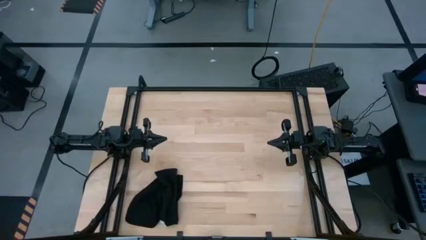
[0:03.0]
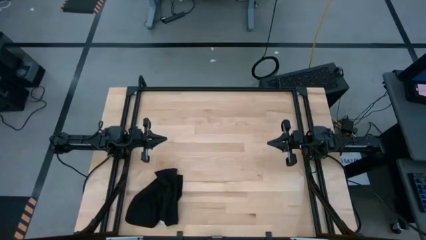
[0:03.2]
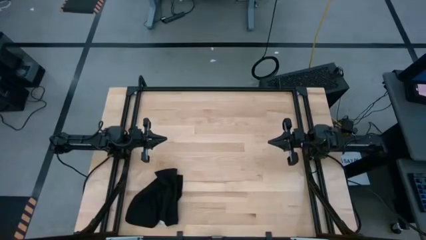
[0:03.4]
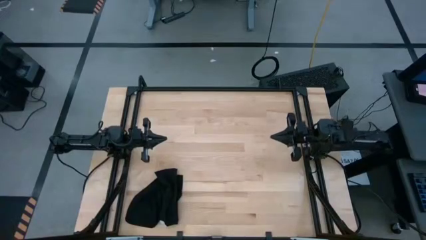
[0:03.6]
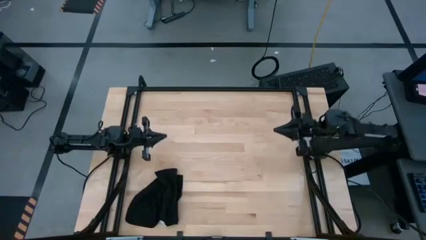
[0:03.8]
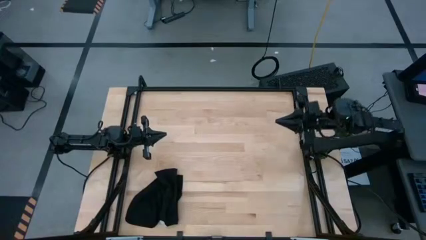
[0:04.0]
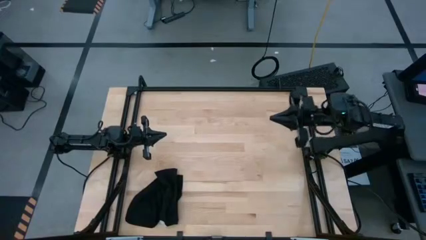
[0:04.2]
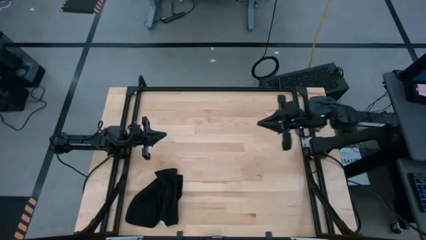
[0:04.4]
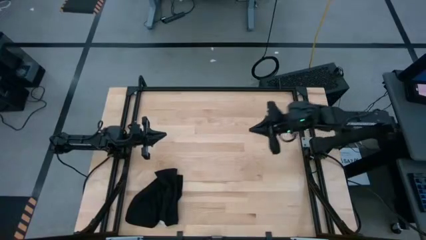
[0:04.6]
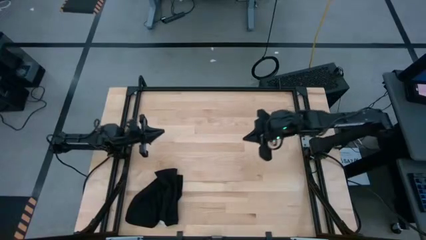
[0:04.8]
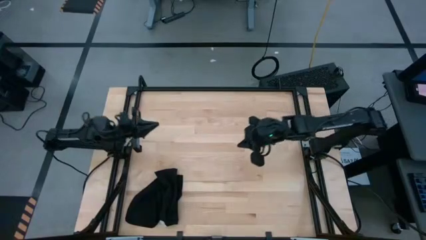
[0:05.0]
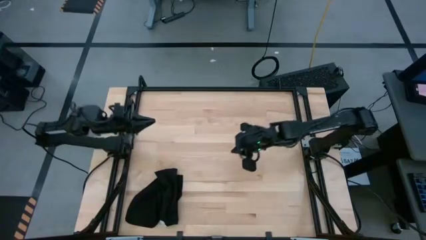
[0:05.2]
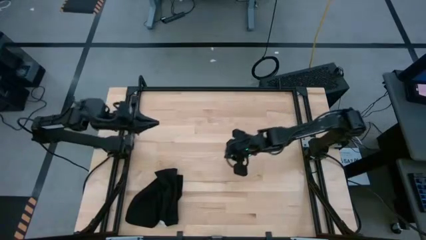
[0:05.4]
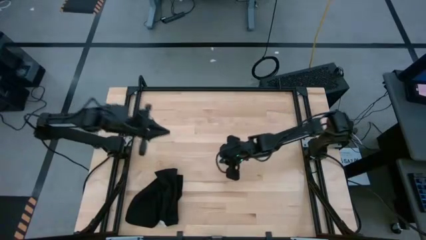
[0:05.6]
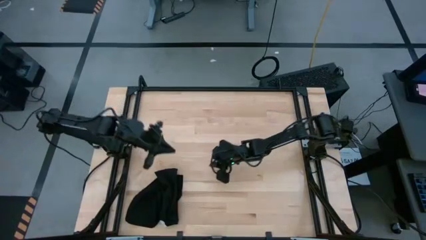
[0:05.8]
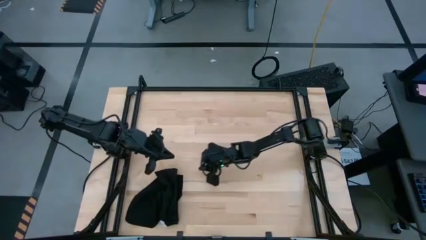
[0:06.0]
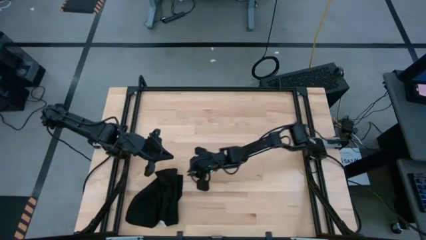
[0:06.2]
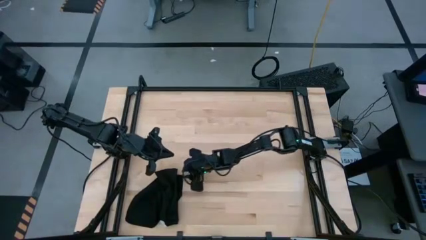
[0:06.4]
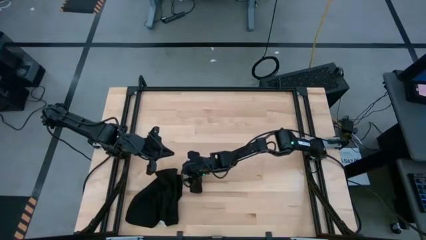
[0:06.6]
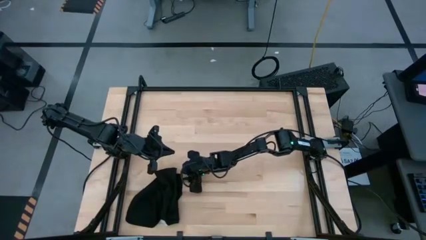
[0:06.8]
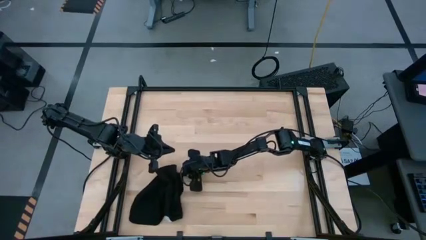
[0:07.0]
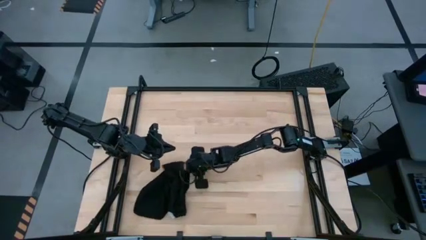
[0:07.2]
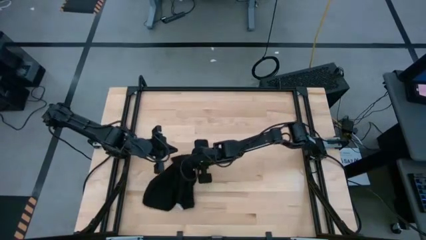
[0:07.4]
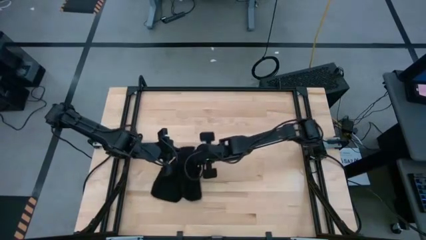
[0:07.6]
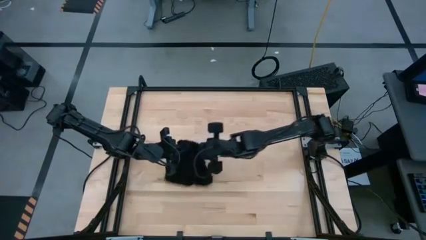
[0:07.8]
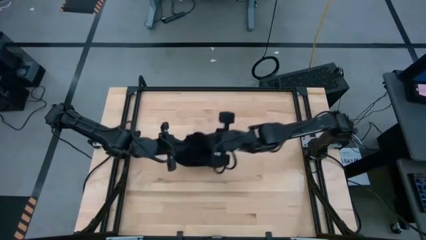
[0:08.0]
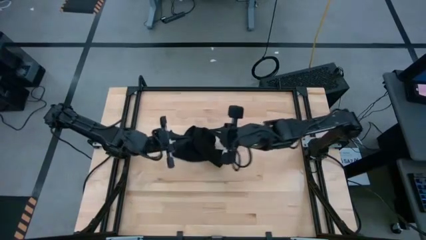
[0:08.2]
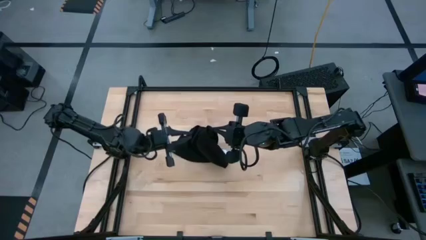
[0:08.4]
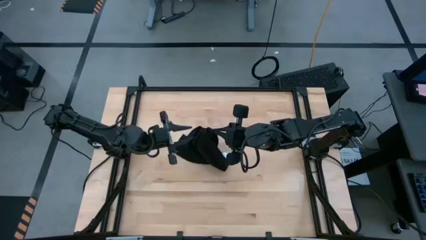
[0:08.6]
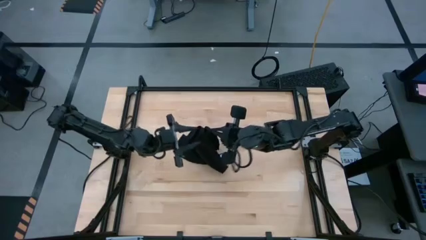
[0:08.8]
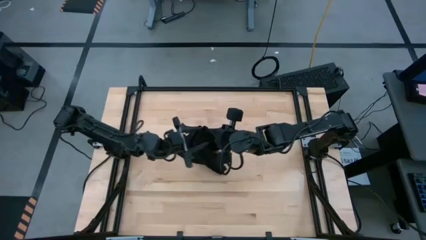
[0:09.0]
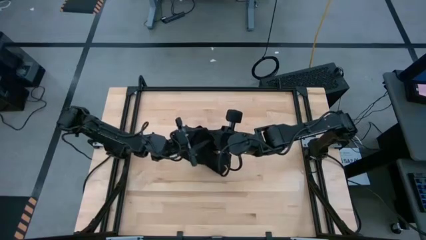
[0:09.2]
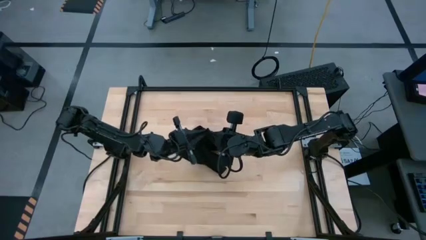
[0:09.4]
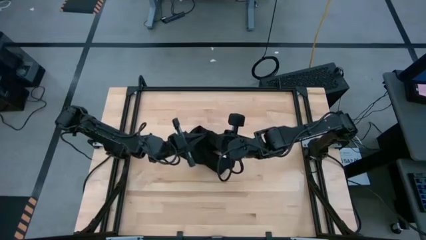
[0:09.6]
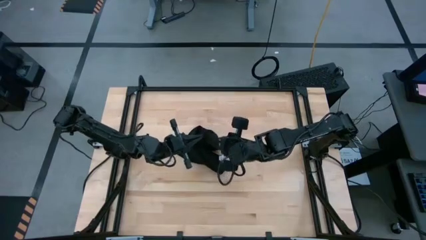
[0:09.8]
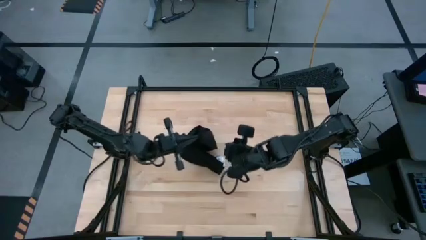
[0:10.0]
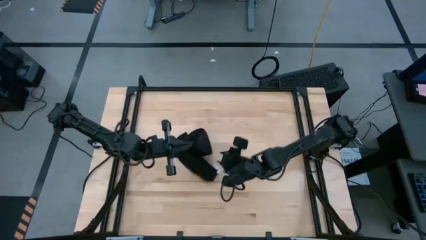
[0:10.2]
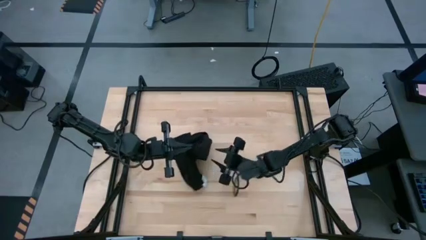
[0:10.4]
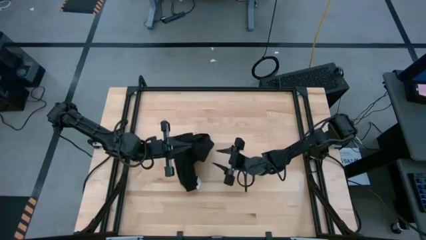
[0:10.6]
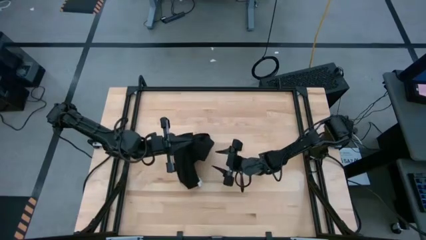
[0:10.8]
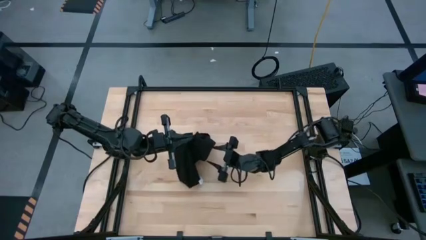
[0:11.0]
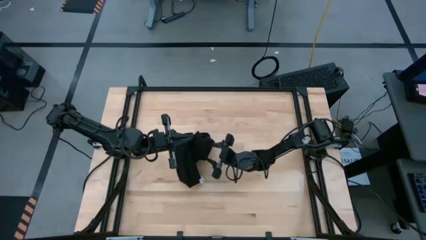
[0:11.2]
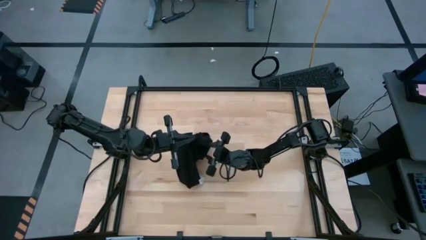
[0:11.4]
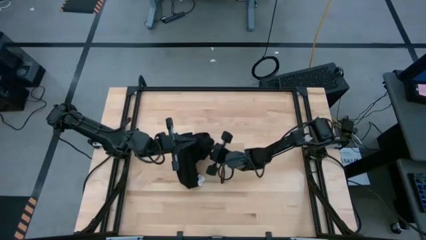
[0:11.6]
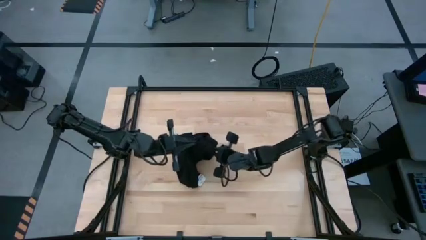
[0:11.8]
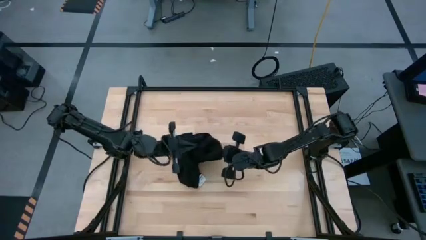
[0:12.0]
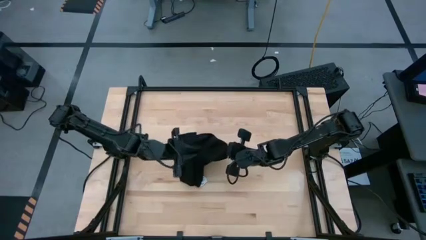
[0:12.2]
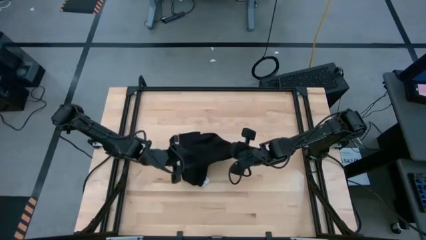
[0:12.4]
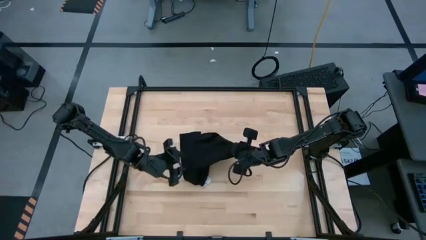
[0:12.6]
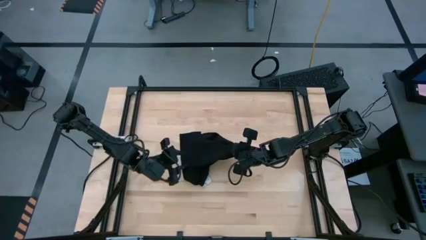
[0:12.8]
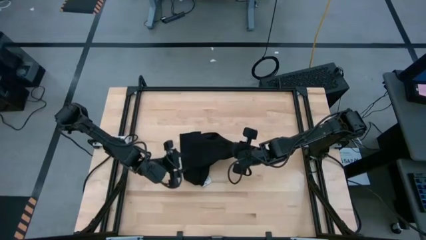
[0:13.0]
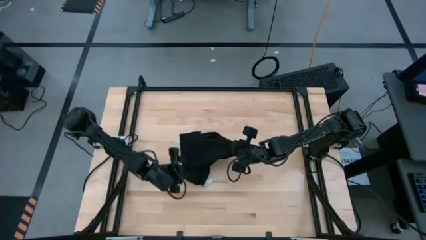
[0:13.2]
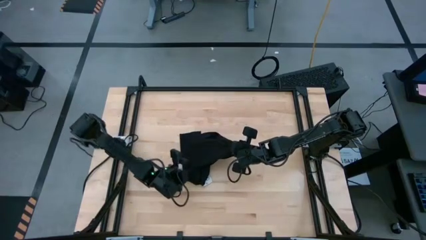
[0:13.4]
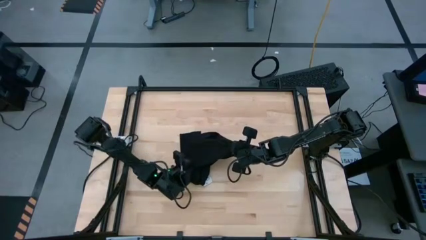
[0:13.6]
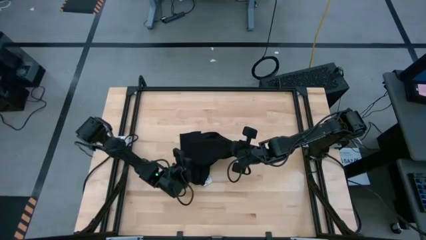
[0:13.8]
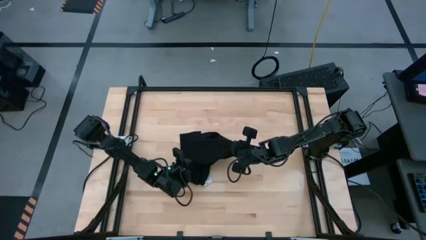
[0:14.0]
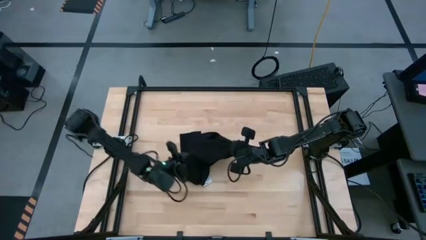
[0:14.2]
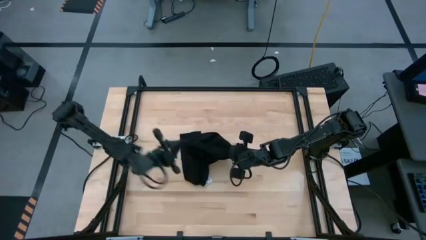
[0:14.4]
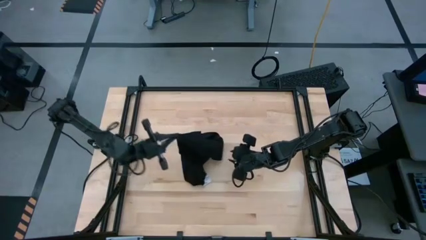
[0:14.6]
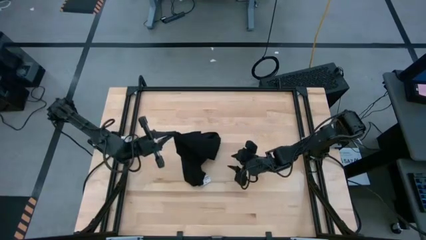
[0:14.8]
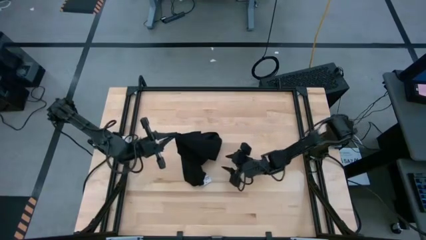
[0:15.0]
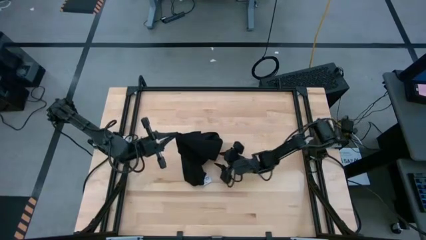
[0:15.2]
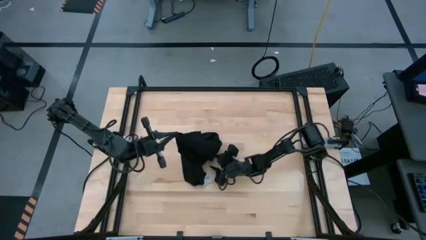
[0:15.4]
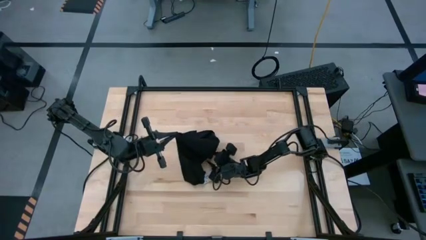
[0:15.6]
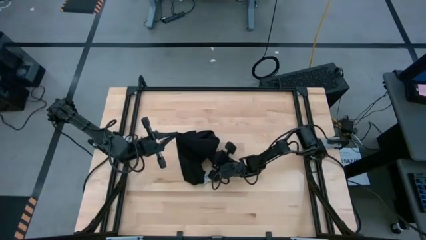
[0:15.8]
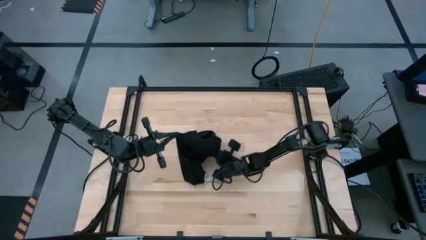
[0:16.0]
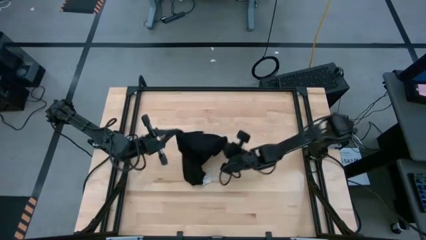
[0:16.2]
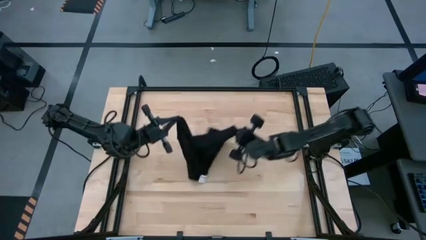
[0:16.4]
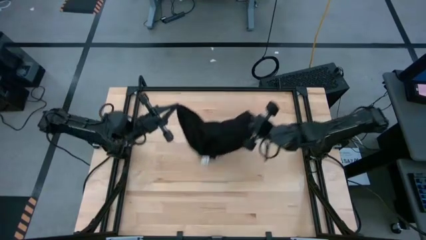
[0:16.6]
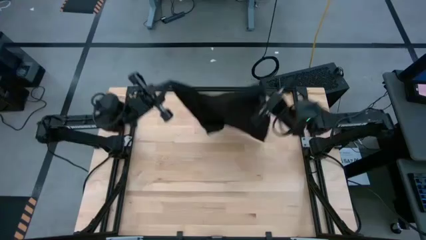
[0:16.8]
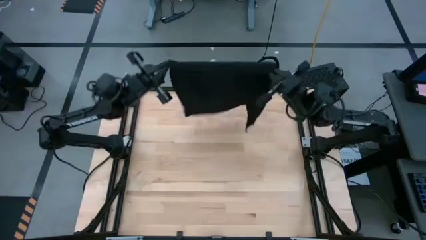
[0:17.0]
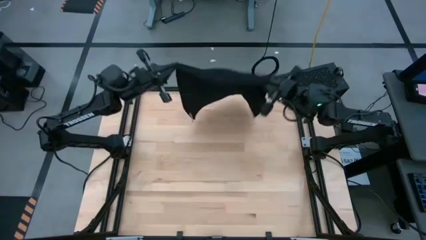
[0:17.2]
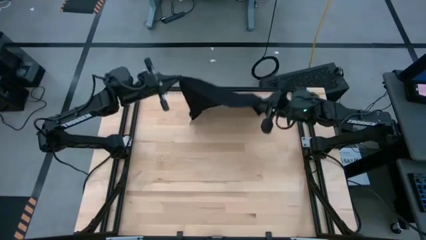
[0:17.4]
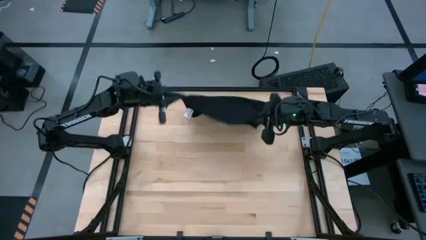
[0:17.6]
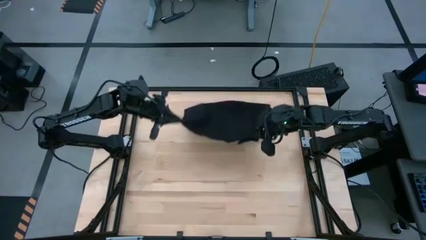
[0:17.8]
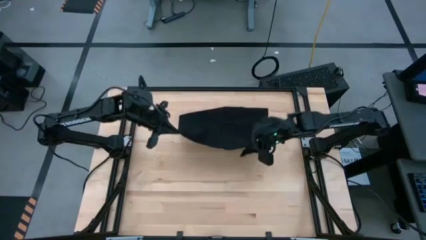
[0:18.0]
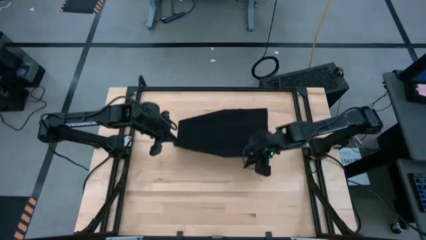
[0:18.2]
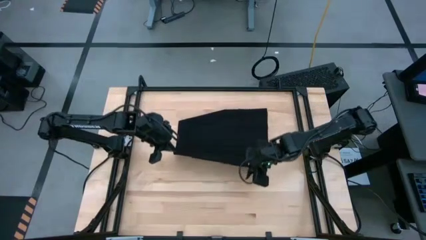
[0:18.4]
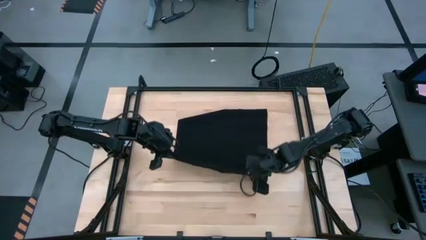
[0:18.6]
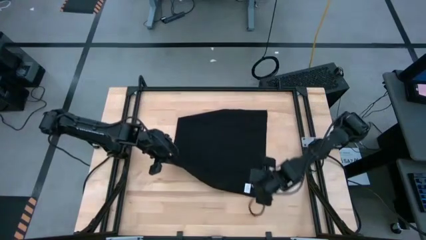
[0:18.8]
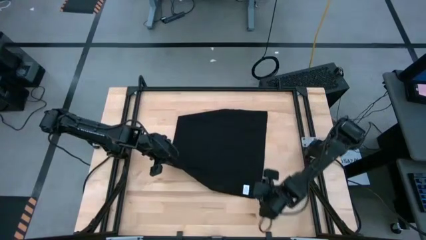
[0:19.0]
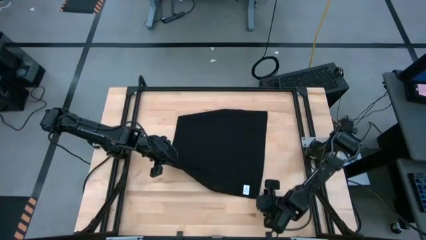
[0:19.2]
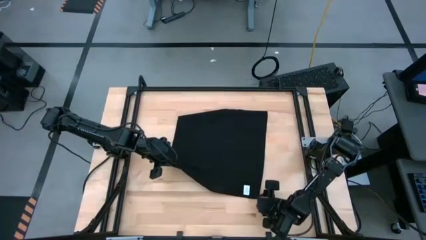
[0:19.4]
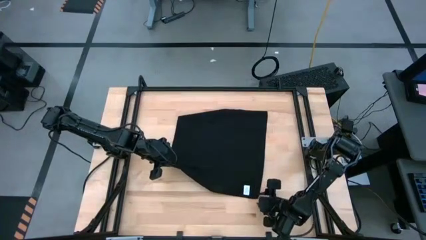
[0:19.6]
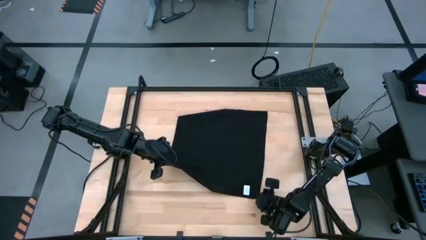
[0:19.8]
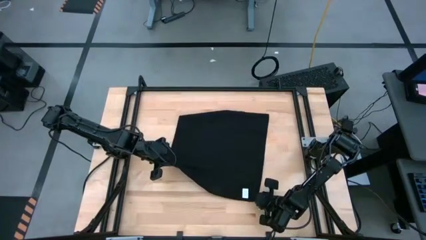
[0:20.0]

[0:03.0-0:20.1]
Task: Roll napkin
Fold the black napkin
